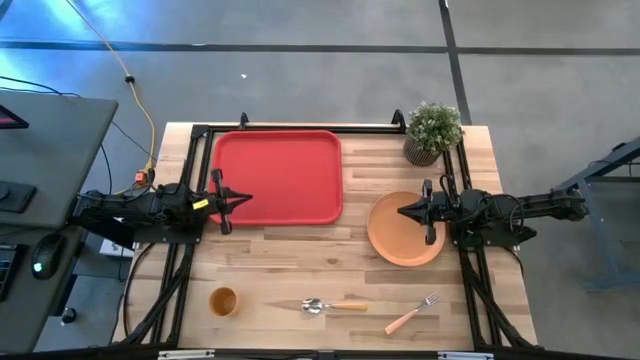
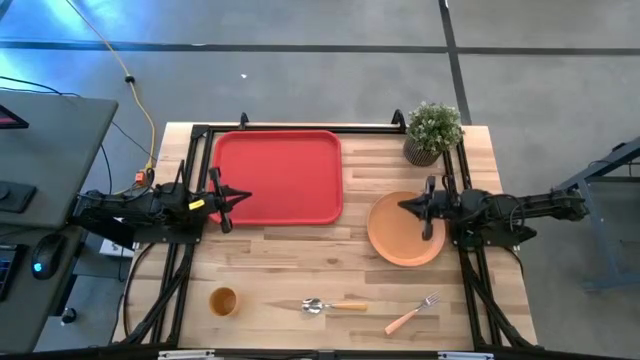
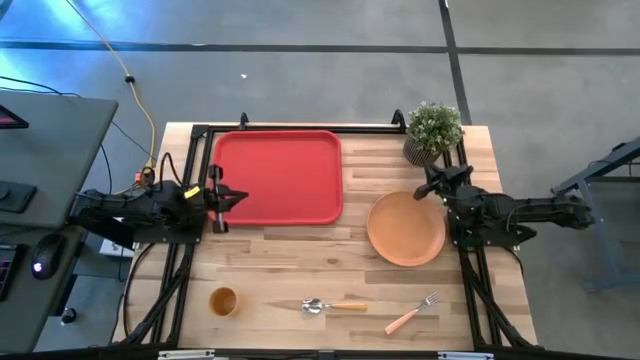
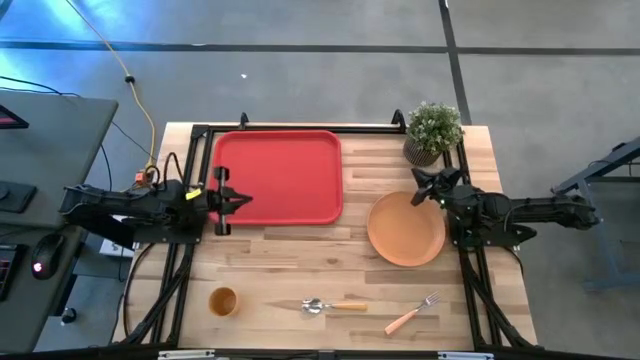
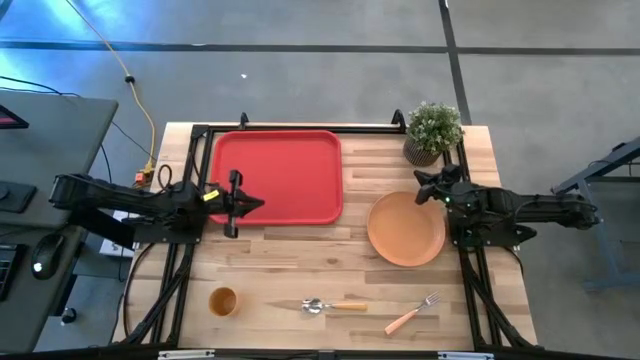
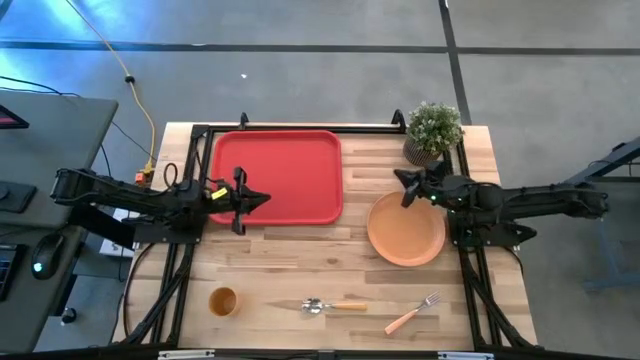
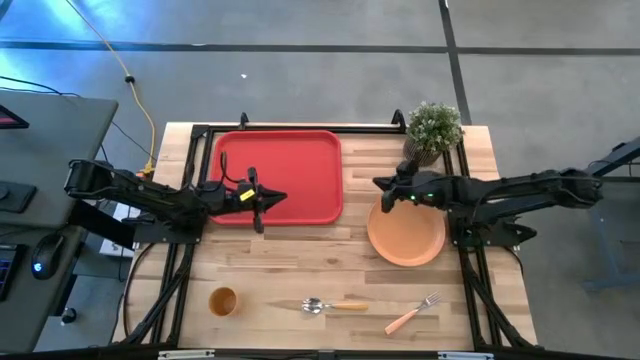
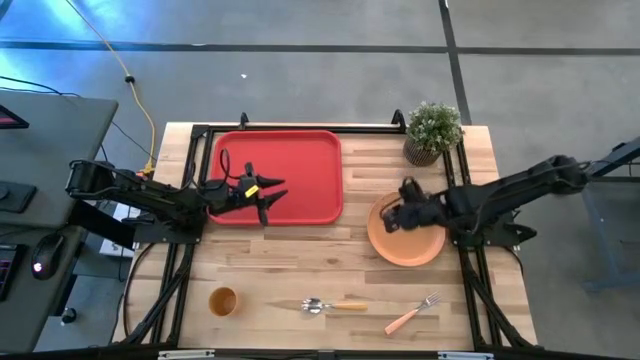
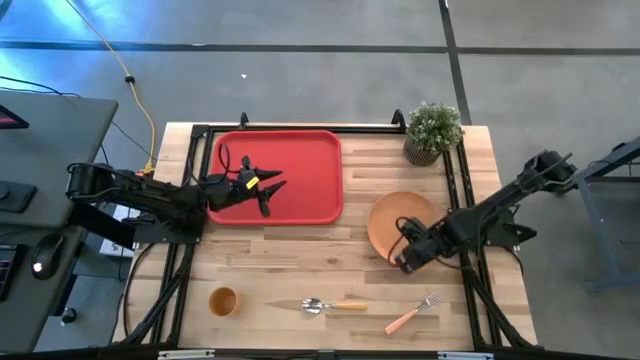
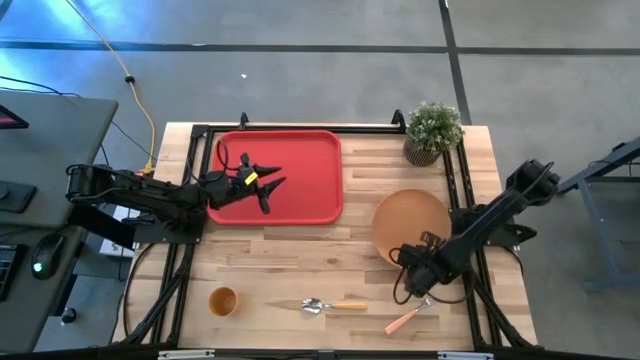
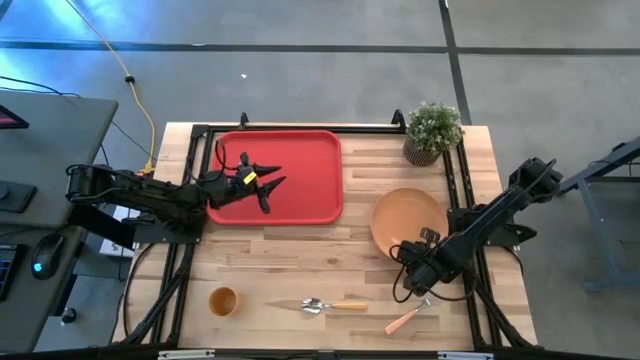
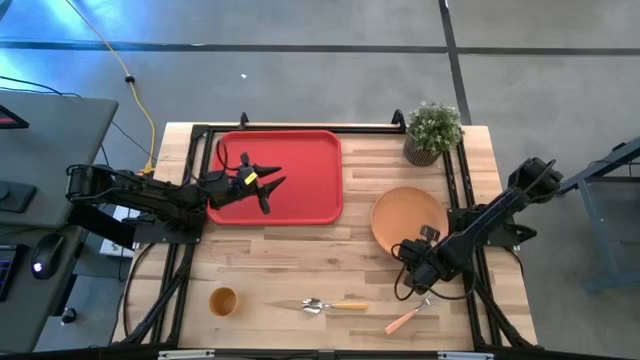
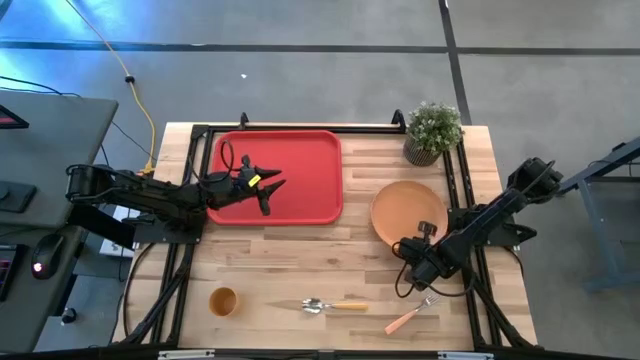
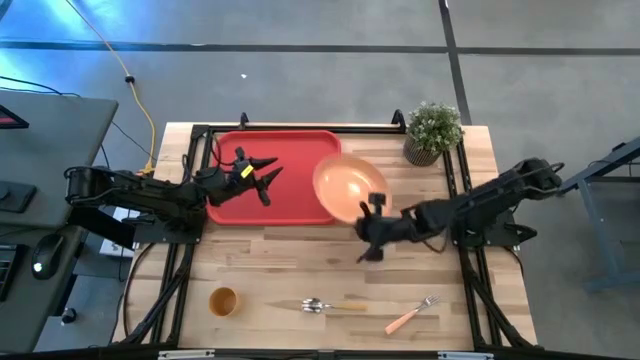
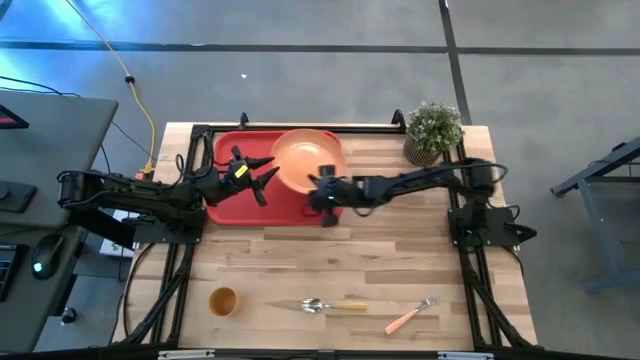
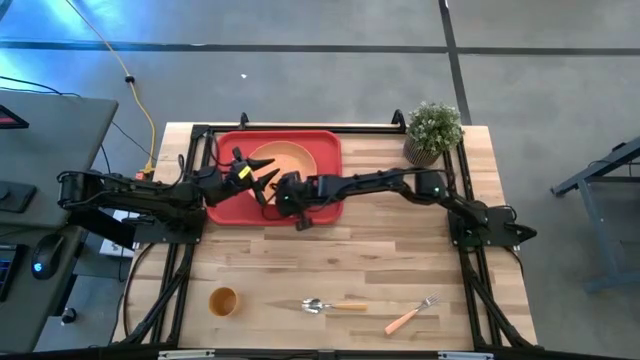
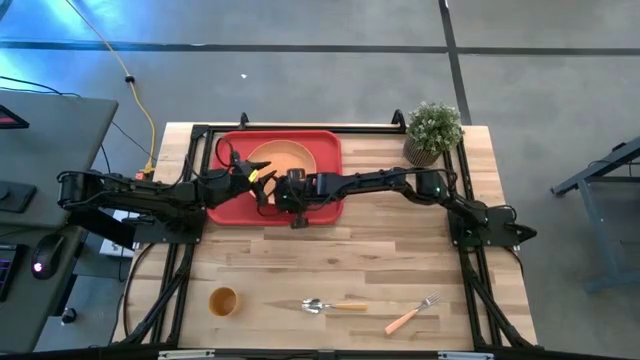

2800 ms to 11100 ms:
Task: Pick and place plate/cup/fork/spoon on tray
Put the brown plate on the red tray

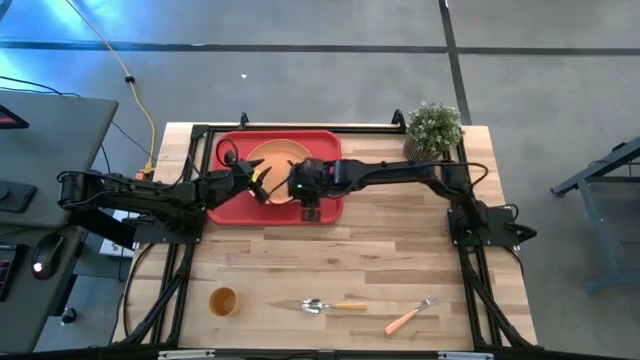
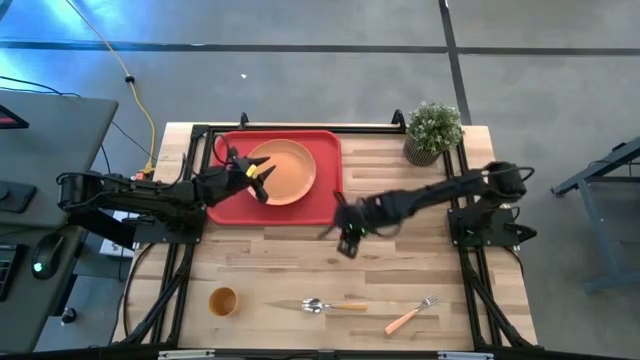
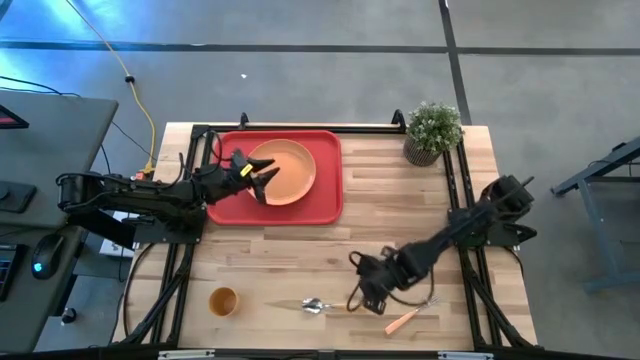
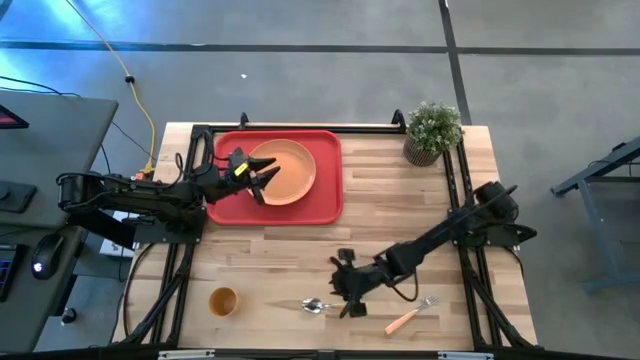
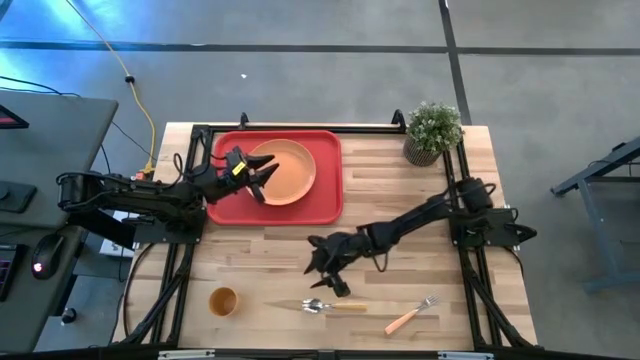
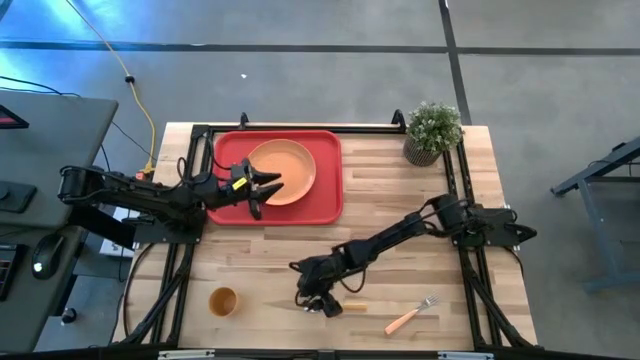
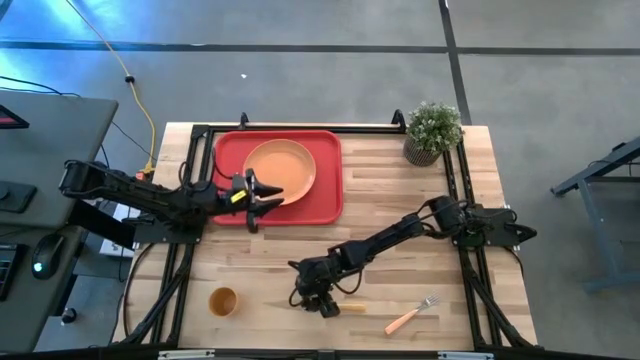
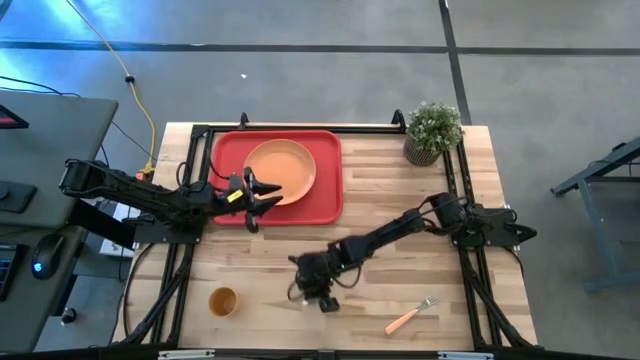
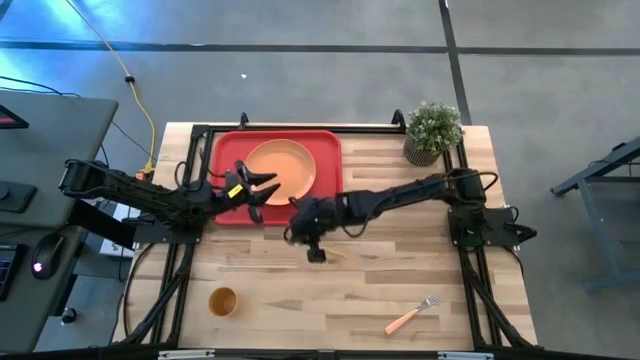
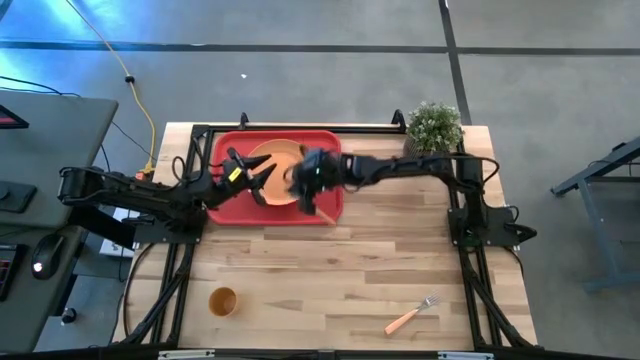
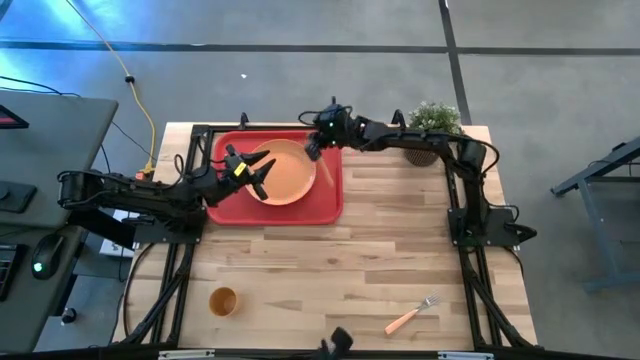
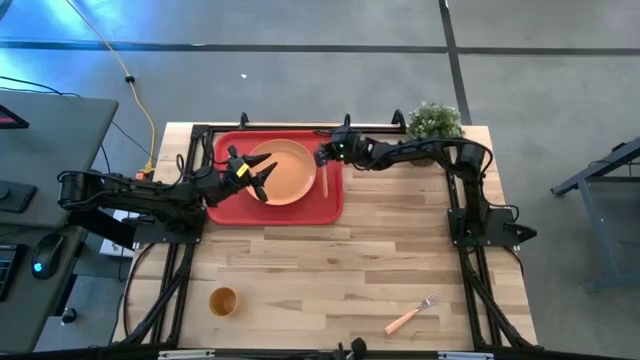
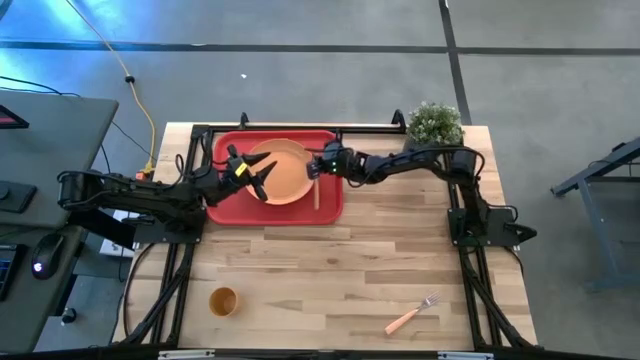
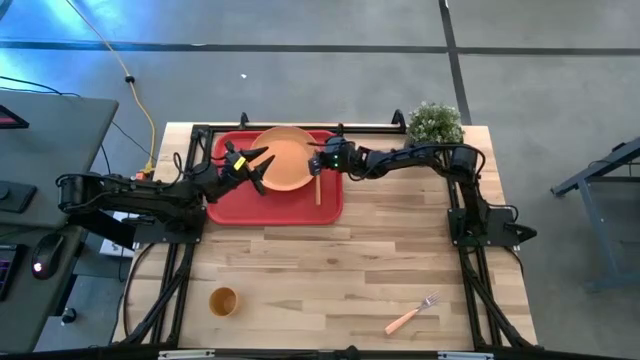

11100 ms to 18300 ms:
Put the yellow spoon on the red tray to the right of the brown plate

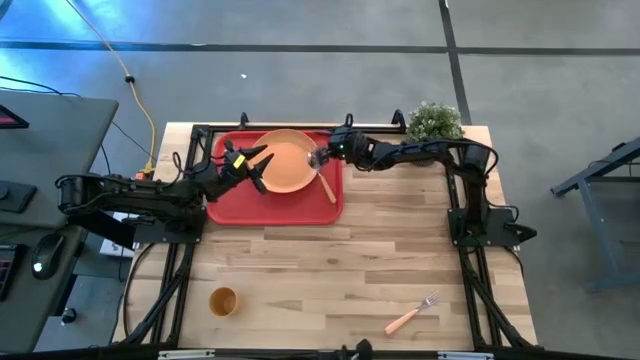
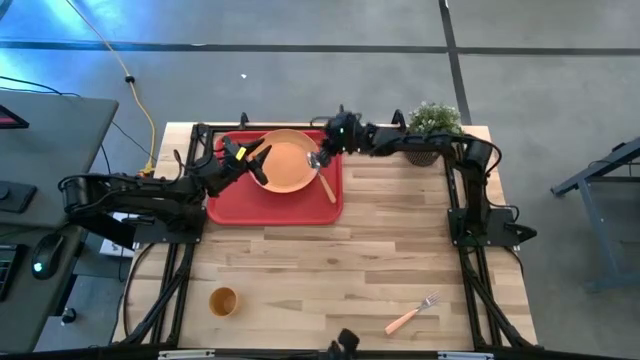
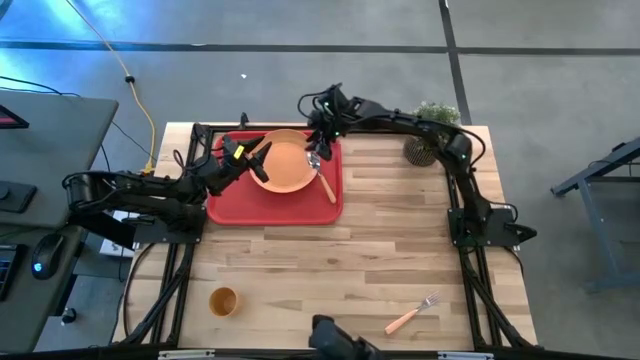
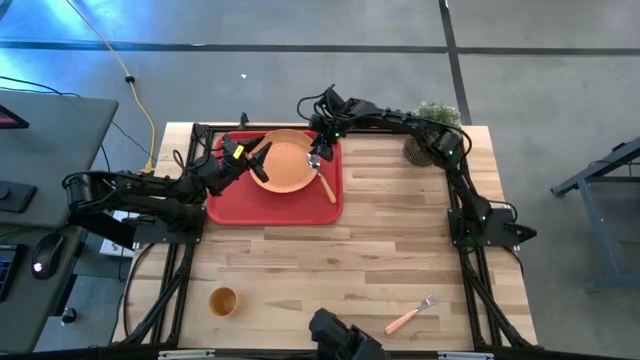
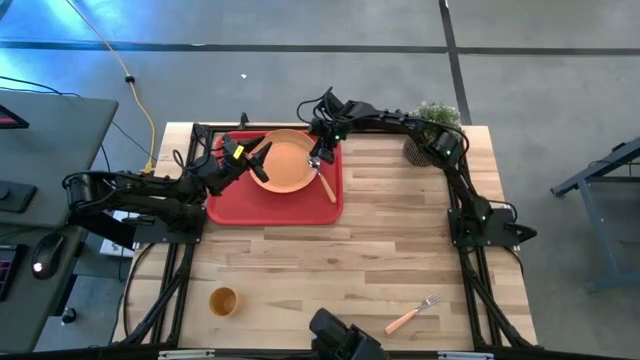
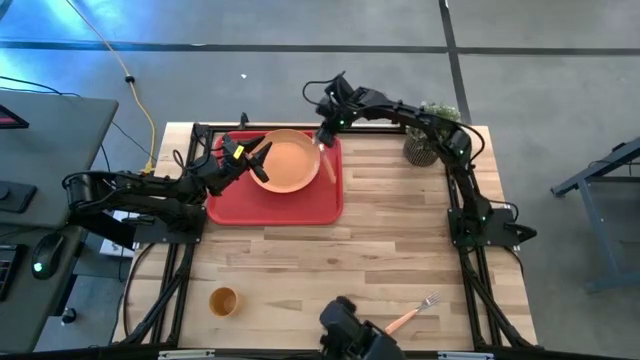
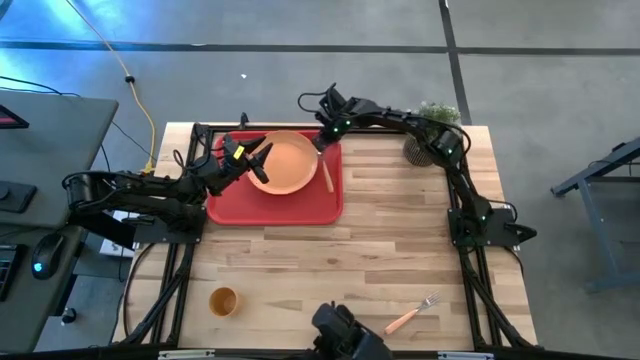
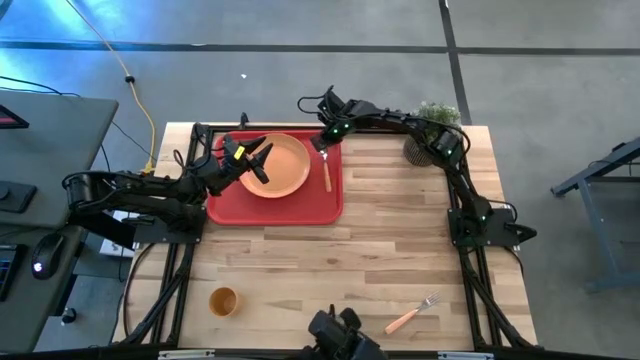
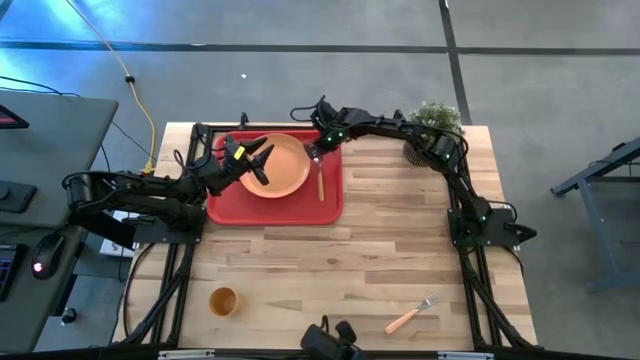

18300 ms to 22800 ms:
Put the yellow spoon on the red tray to the right of the brown plate
